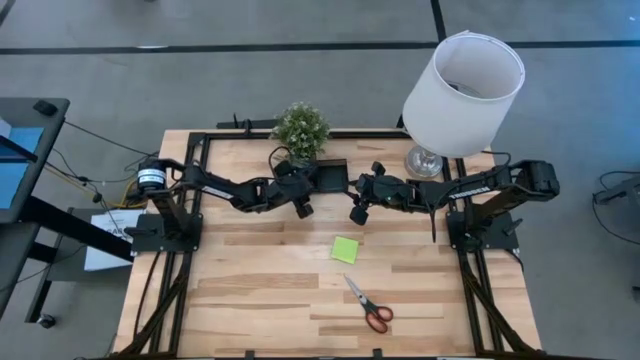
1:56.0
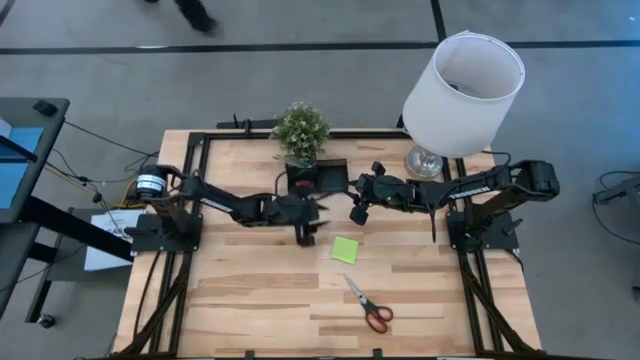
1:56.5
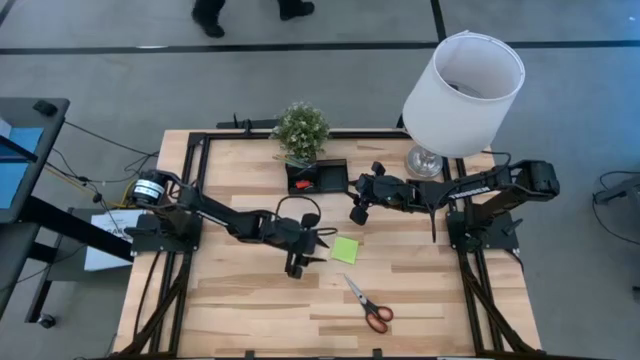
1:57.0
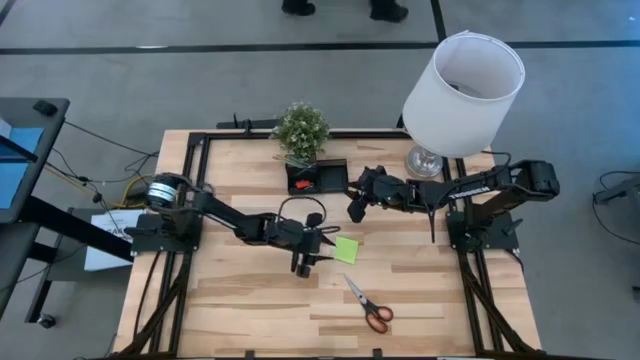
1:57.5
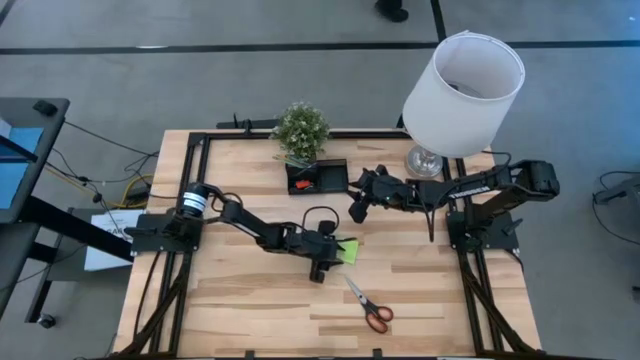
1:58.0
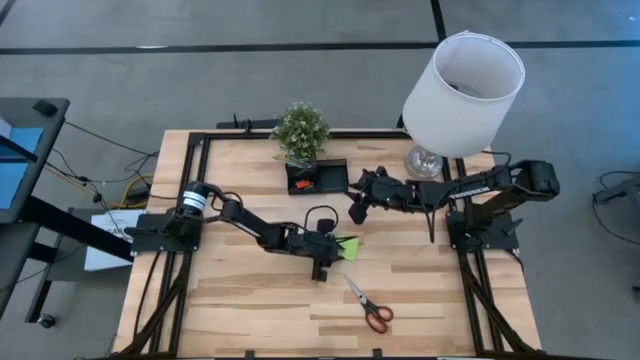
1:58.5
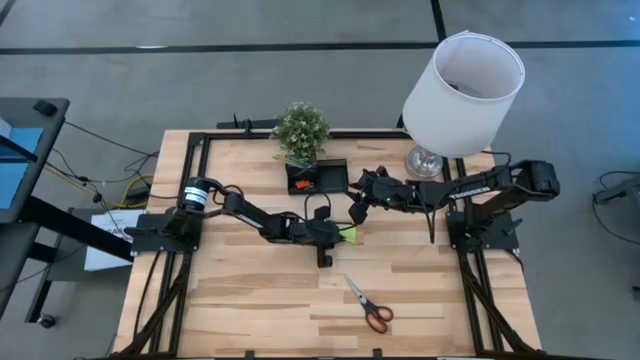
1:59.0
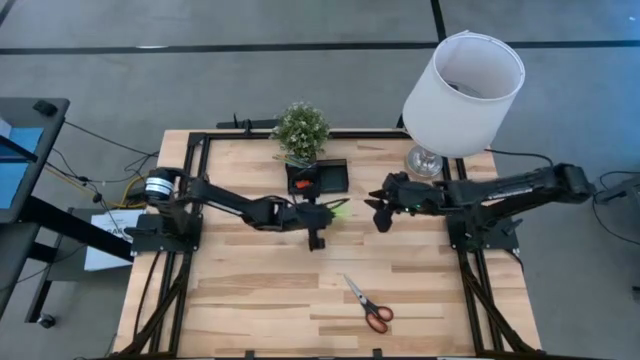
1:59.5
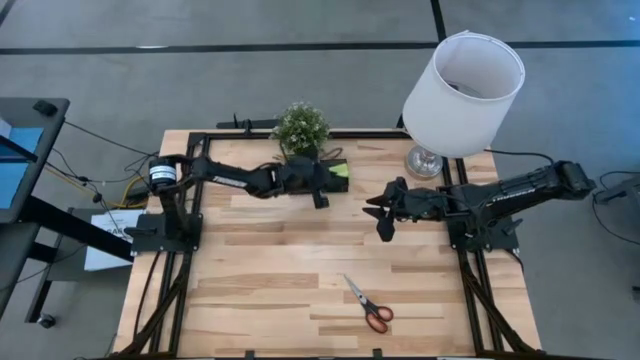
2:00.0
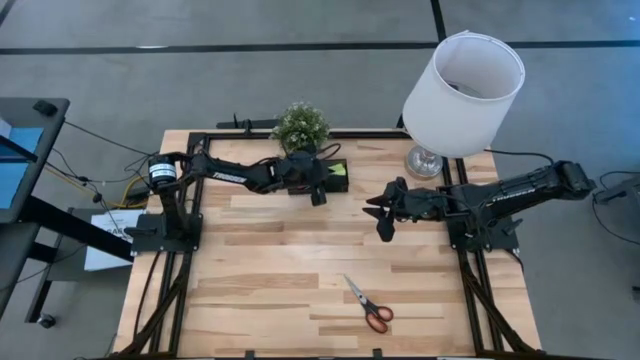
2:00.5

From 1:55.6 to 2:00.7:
Task: Pick and place office supplies into organizer
Put the green sticky note into the black organizer

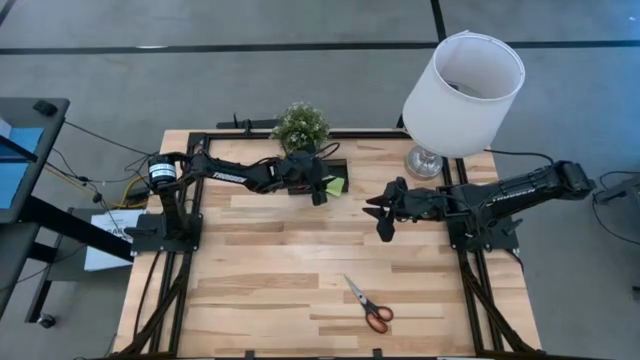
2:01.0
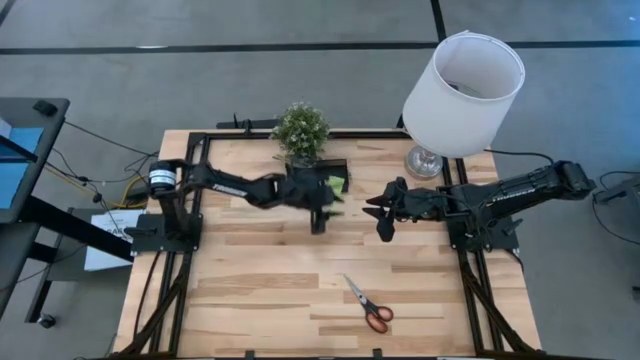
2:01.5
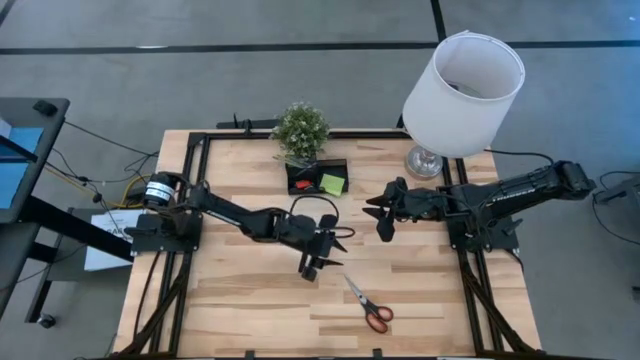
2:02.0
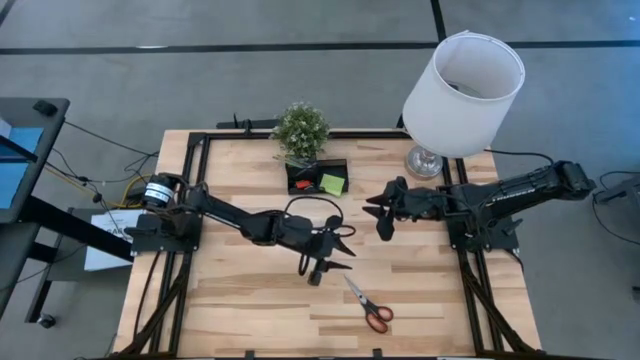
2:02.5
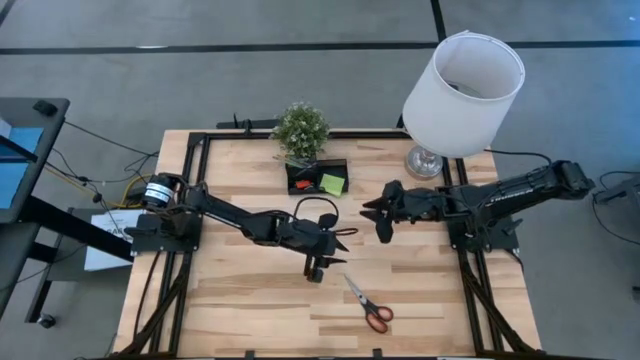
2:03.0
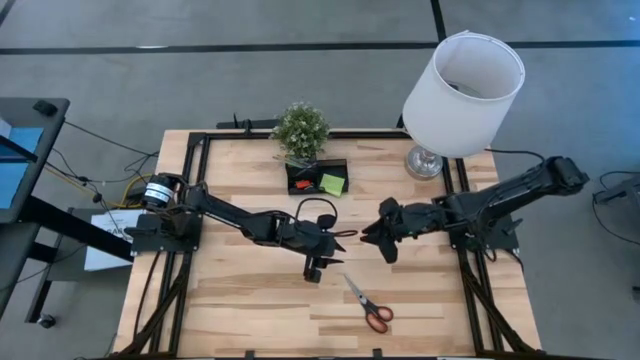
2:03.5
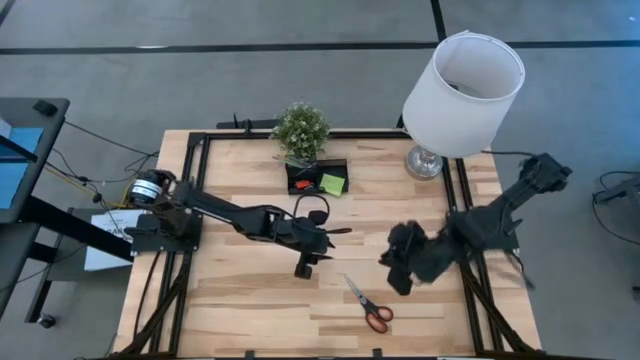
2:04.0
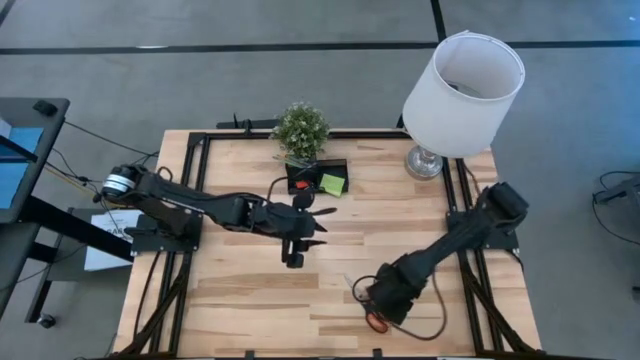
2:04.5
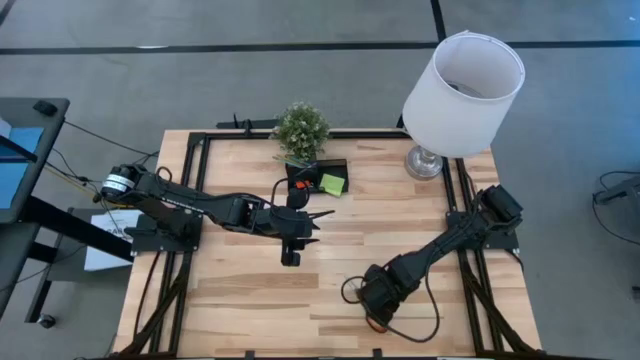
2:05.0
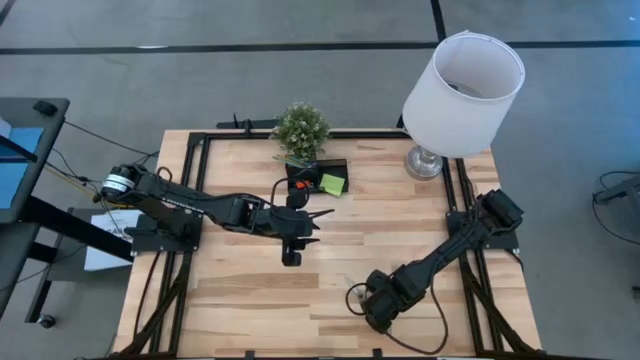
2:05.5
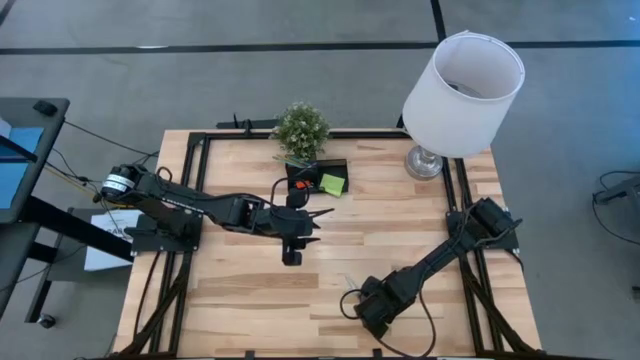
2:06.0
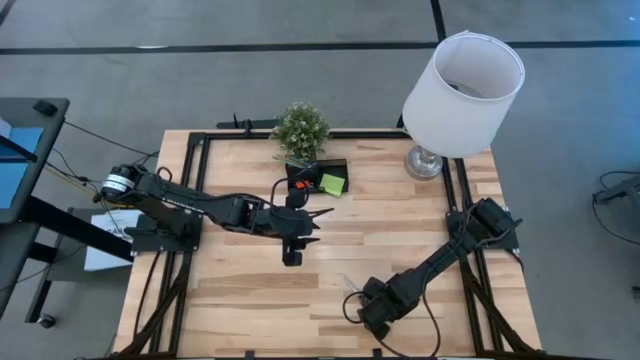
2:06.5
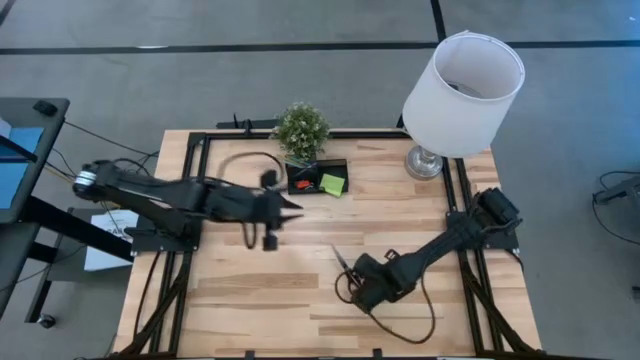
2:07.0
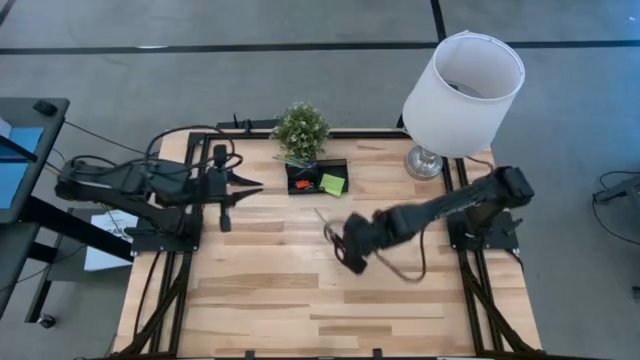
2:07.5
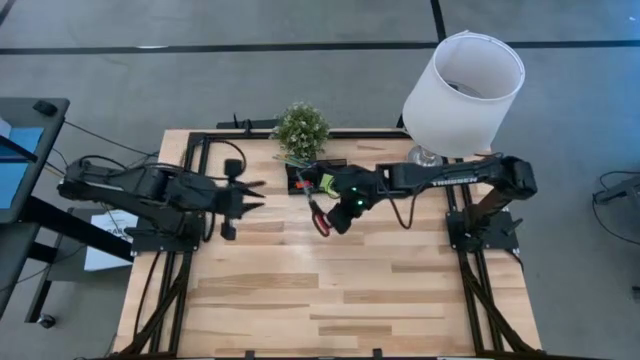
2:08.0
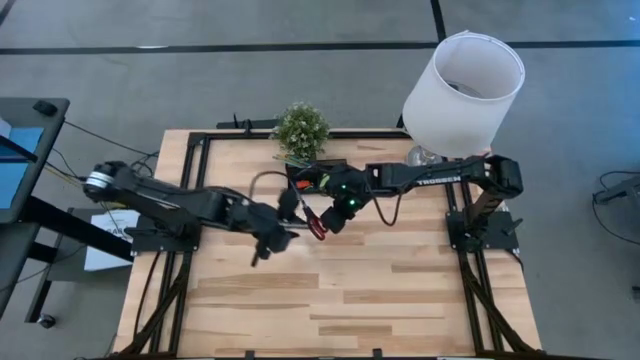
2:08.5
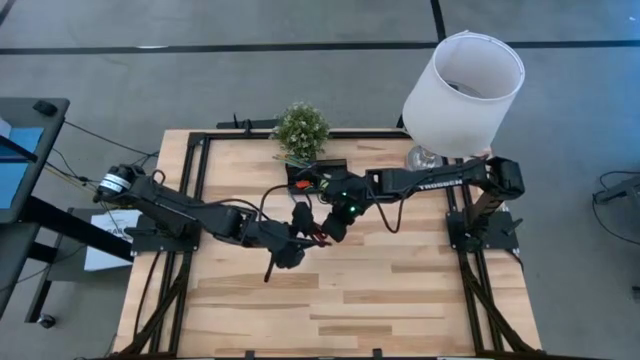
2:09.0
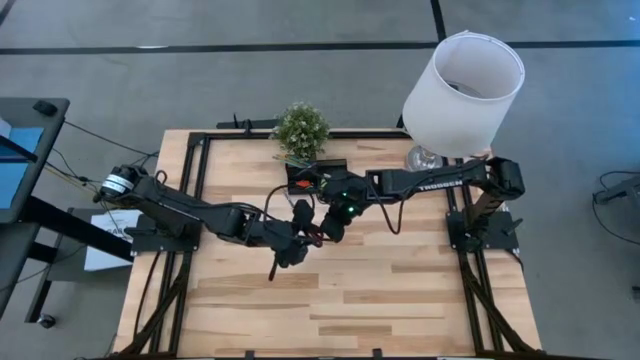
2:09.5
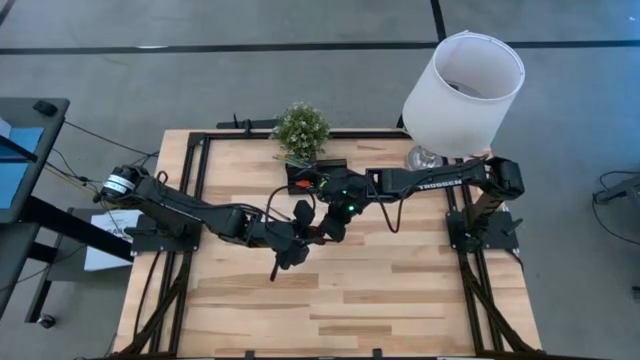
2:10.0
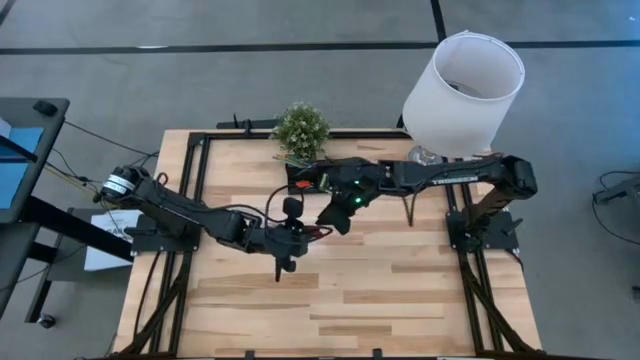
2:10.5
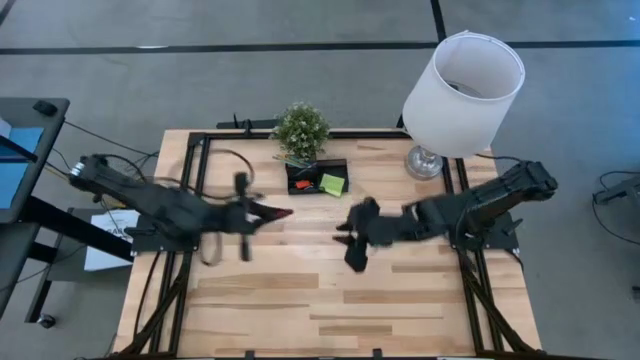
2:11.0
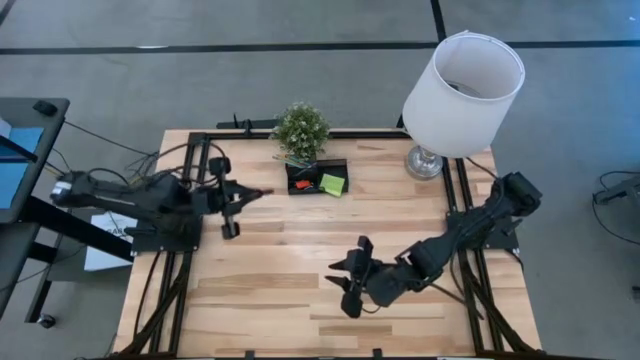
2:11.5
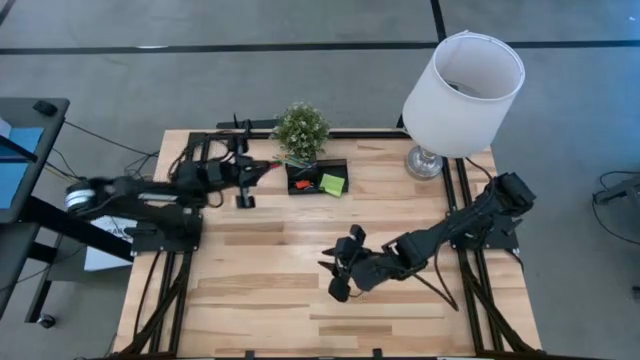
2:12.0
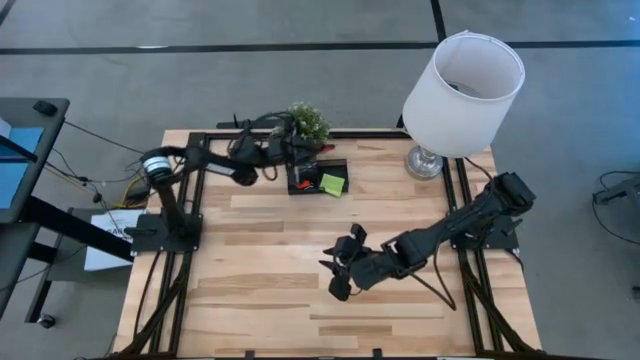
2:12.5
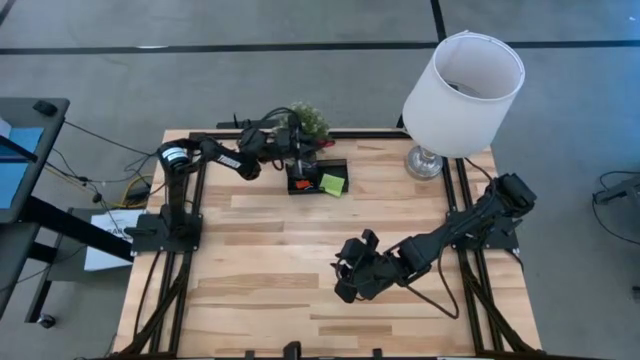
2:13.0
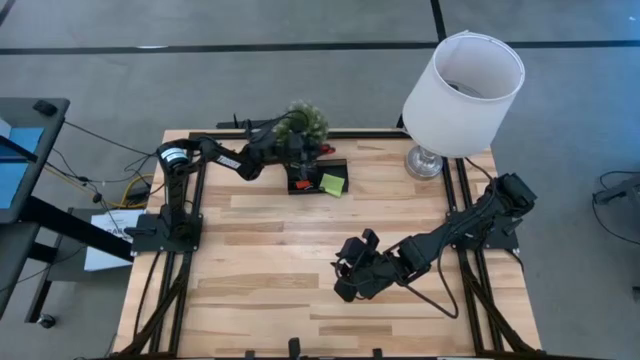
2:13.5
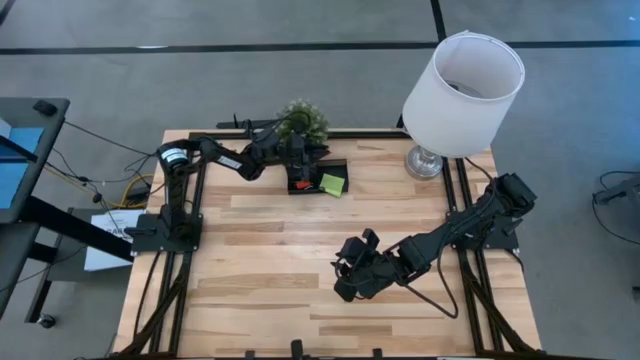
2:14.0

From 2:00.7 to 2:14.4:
Put the black scissors into the black organizer

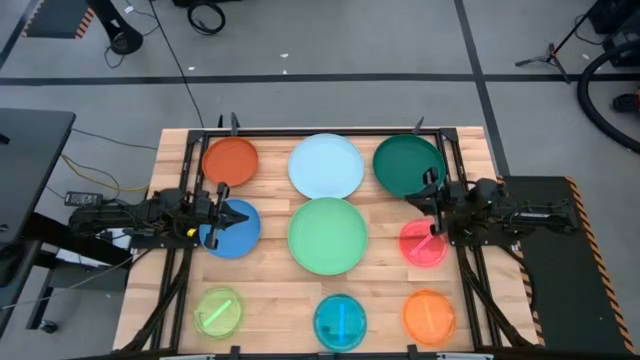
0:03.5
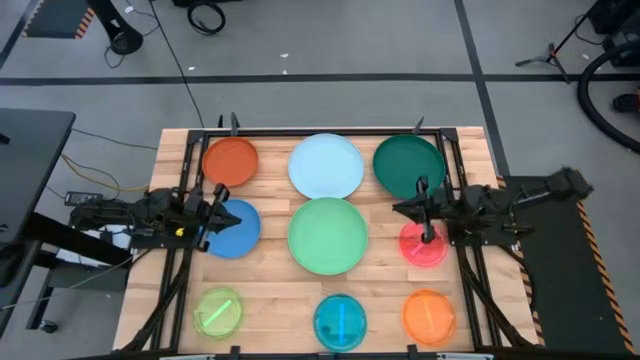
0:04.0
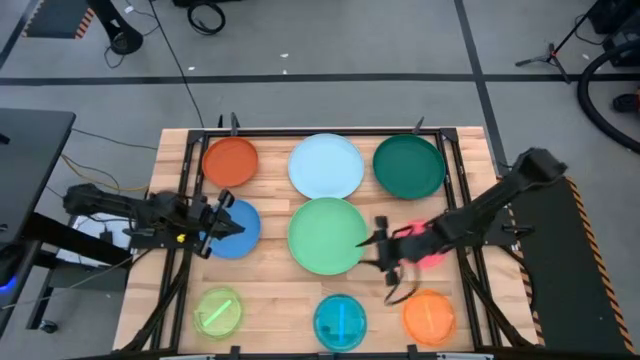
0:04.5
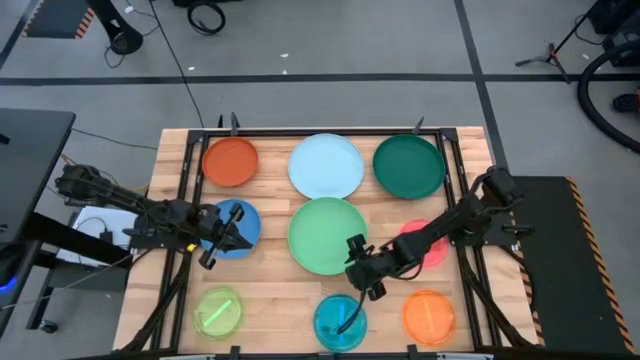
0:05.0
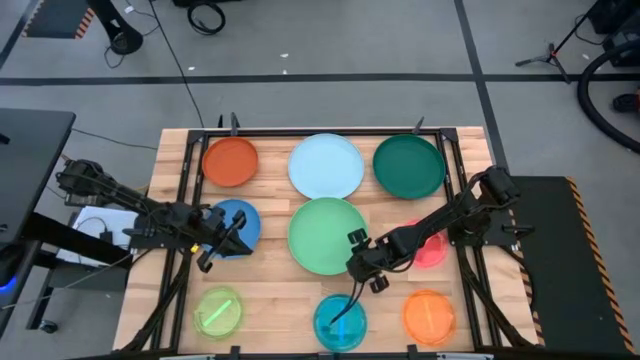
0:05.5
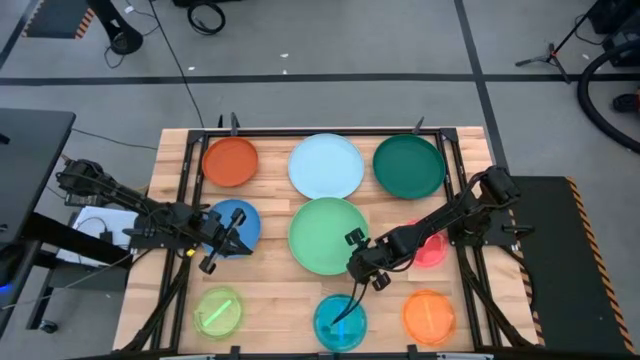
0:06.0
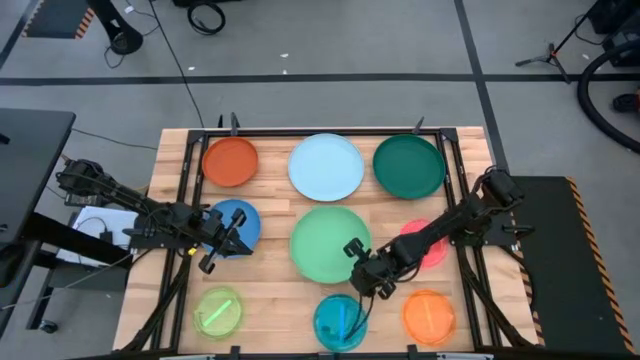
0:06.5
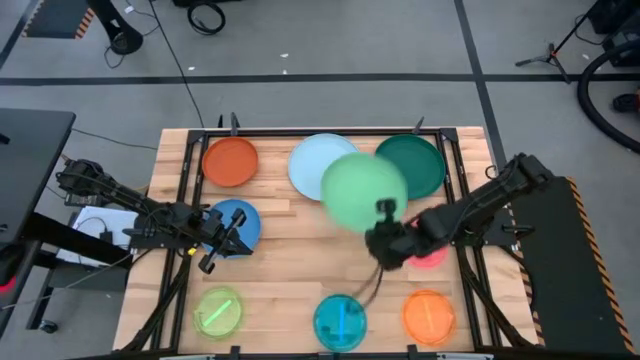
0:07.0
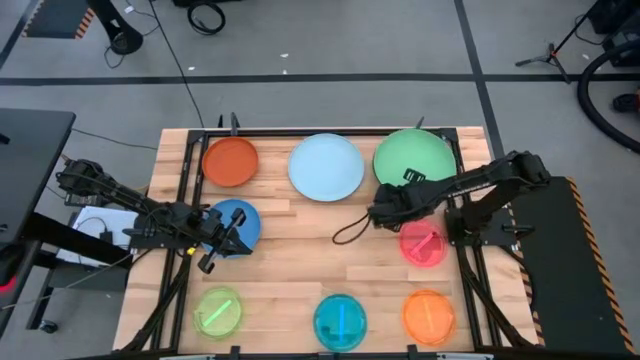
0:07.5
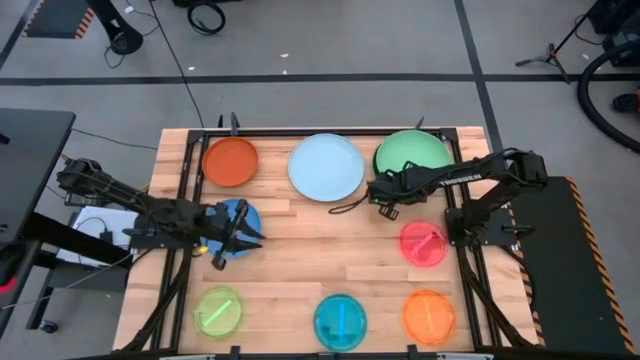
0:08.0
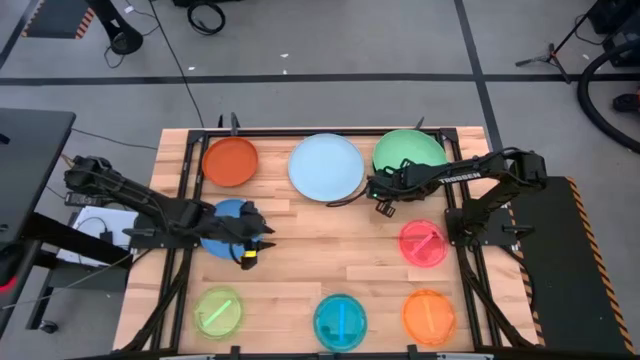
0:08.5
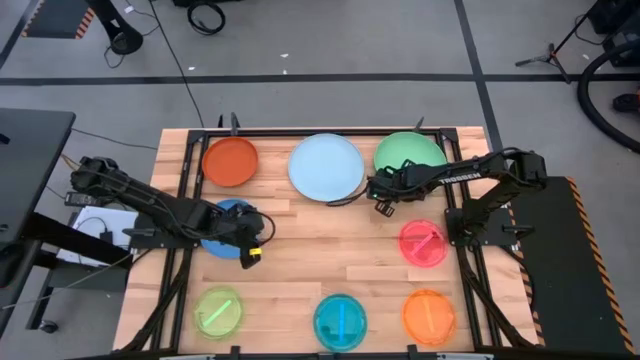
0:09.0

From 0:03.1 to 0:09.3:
Task: Stack plastic plates
Stack the green plate on top of the dark green plate
